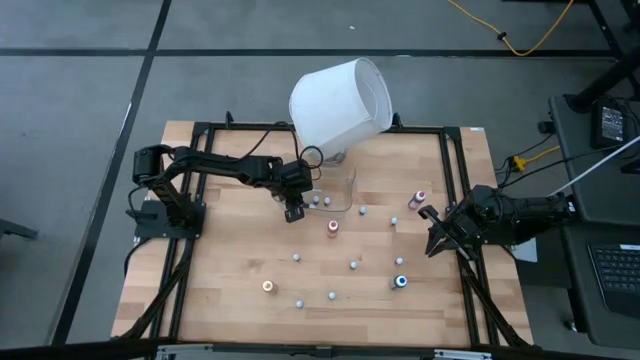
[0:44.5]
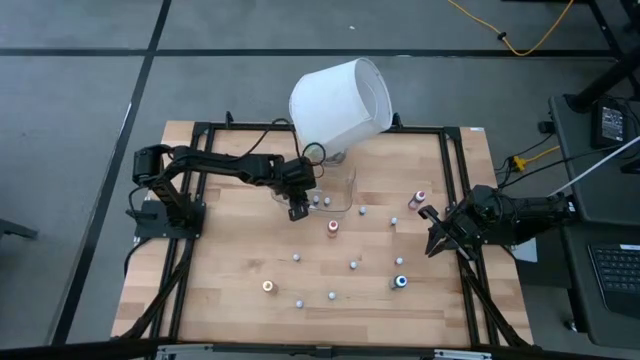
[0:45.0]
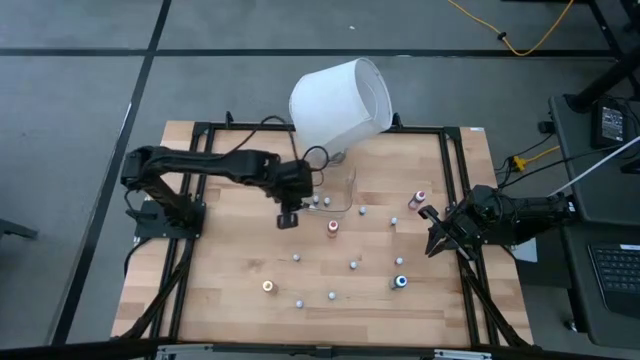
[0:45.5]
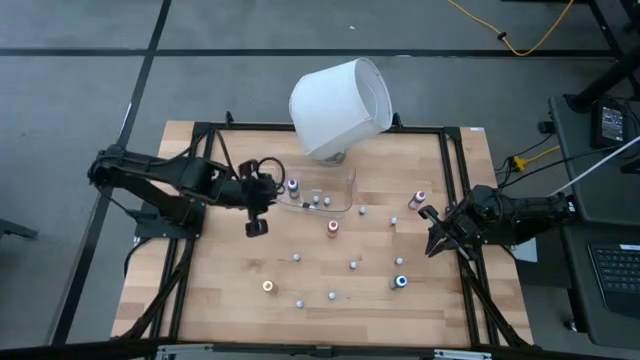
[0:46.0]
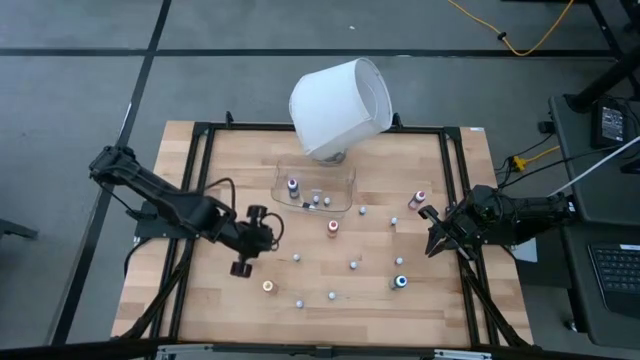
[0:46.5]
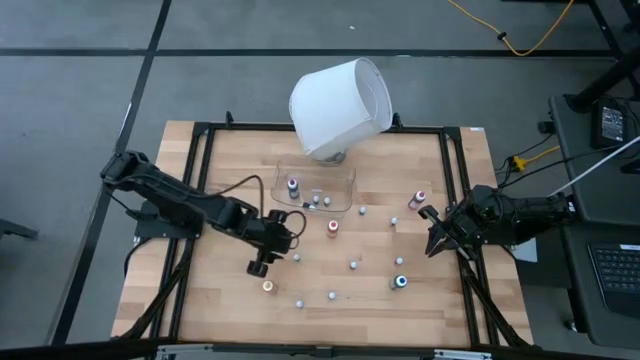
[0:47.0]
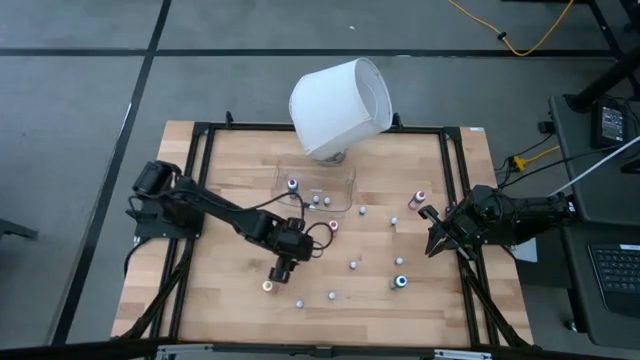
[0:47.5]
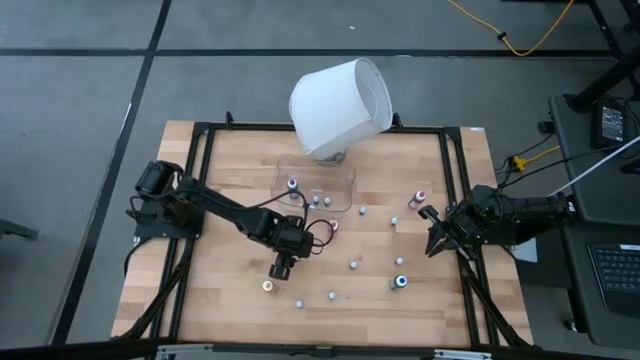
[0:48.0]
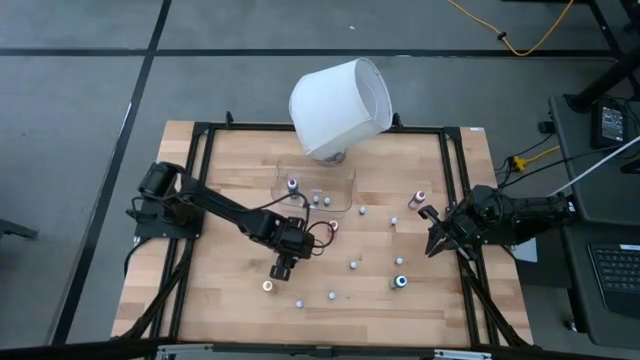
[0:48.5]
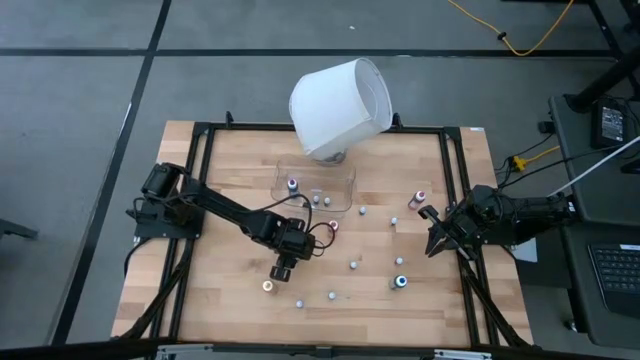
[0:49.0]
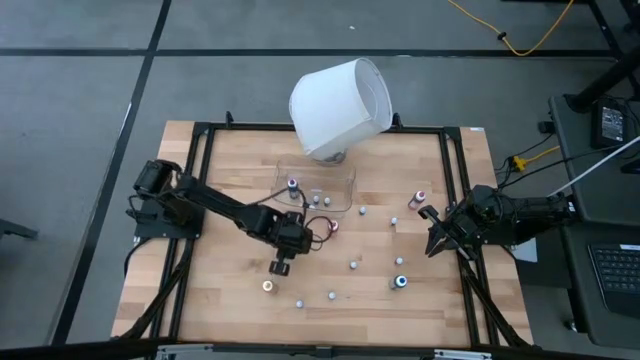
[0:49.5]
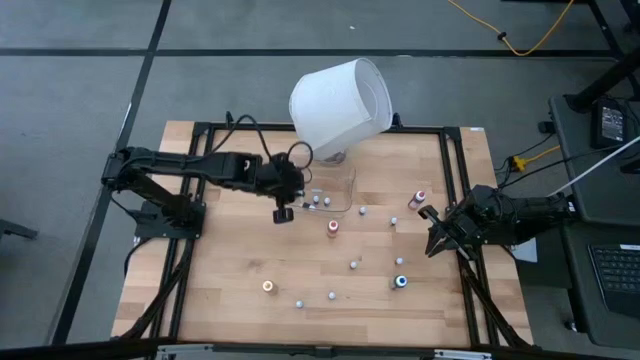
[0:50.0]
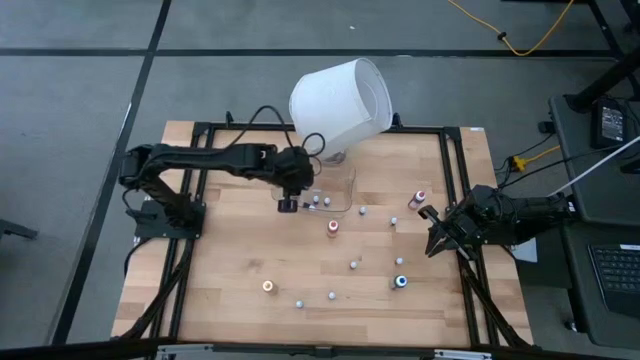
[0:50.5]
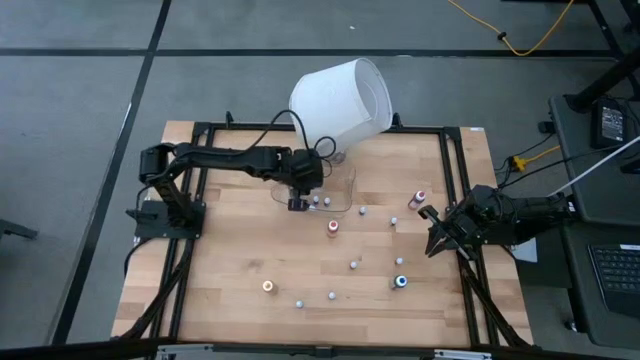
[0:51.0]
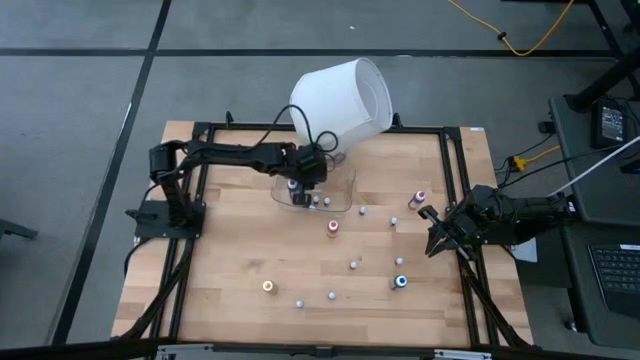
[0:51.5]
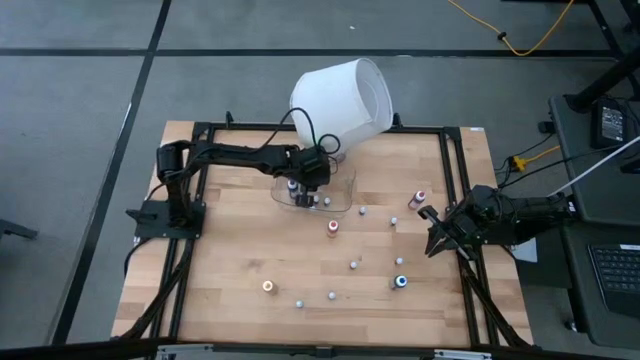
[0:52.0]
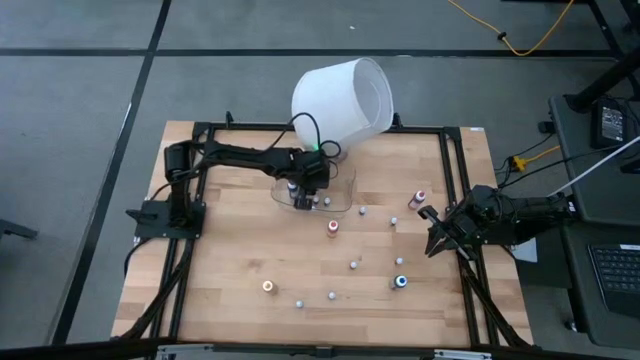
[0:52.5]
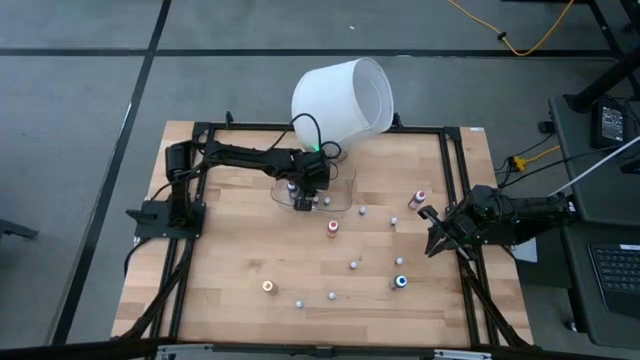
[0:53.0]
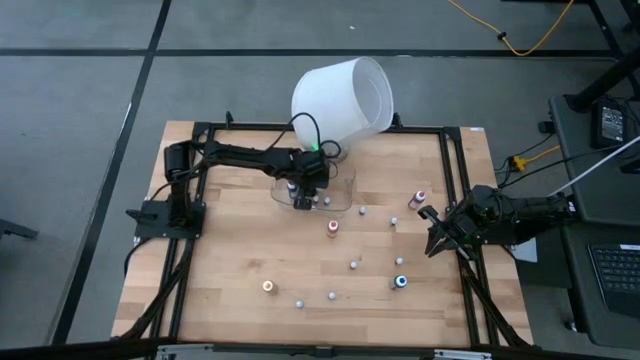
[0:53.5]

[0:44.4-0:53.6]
Task: Pick & Place food coloring
Put the bottom small blue food coloring bottle into the container

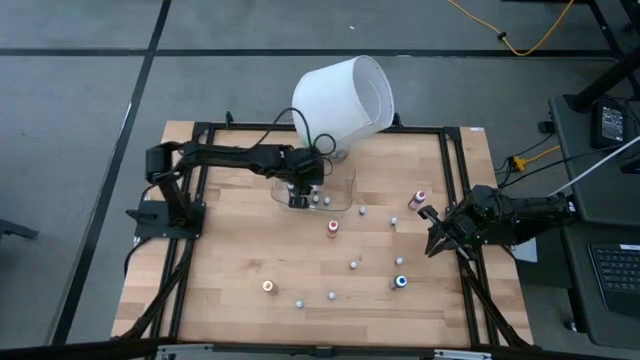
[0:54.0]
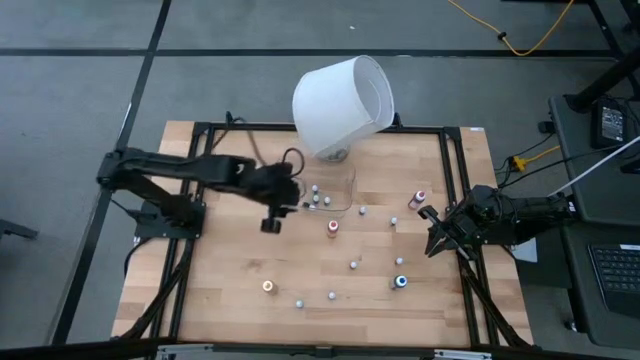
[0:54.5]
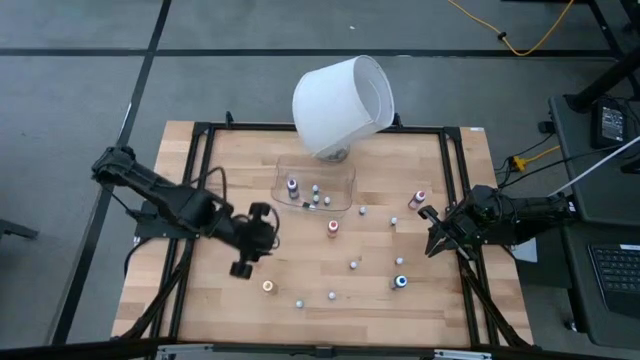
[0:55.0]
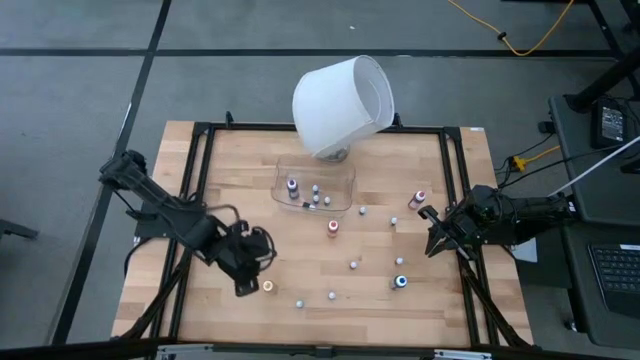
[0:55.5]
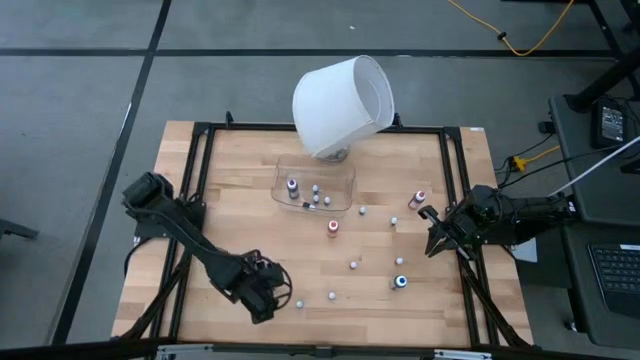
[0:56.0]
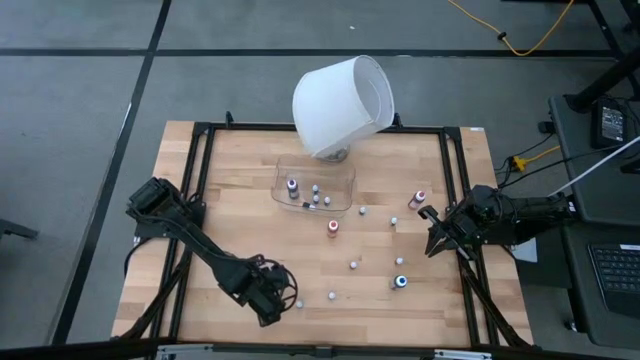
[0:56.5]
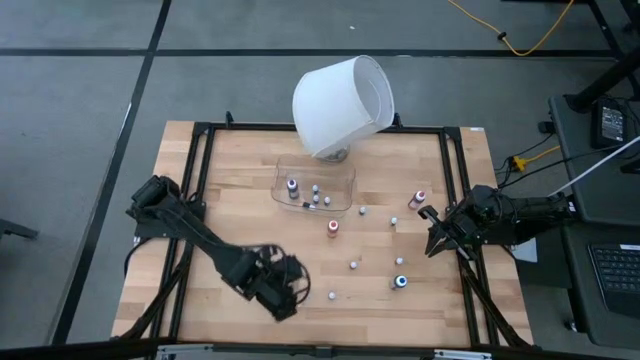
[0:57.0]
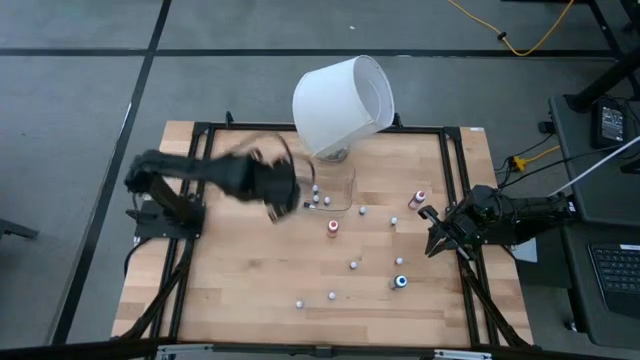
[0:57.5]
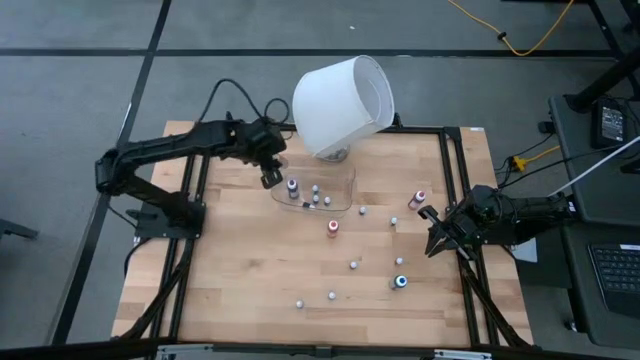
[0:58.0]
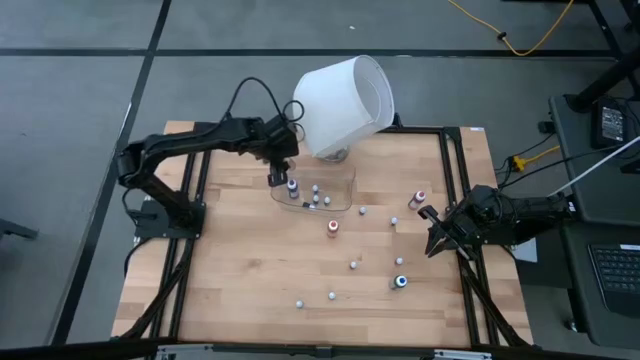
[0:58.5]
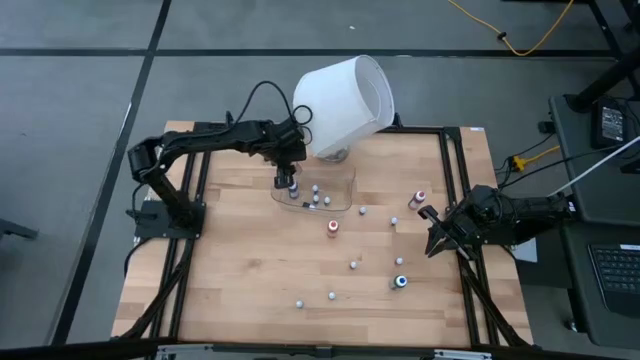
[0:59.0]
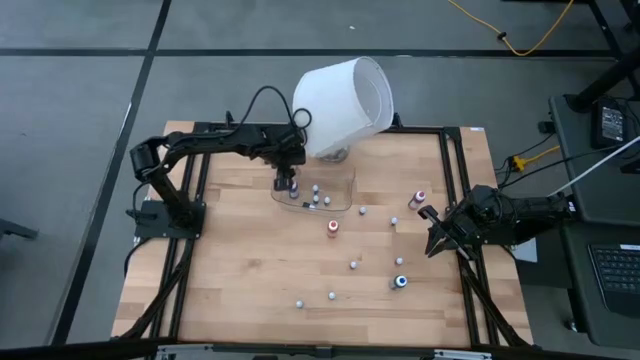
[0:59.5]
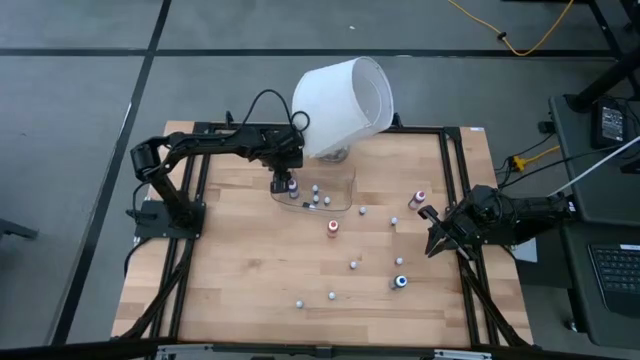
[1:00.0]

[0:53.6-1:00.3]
Put the big yellow food coloring bottle into the container

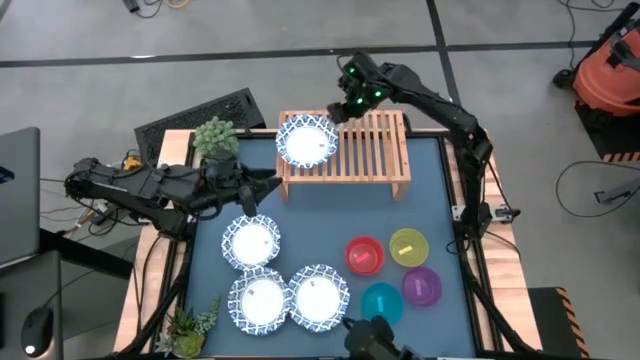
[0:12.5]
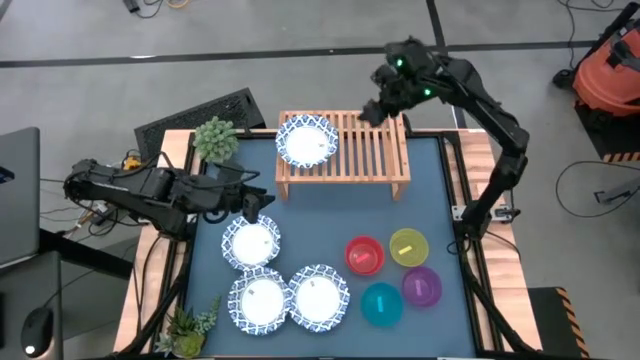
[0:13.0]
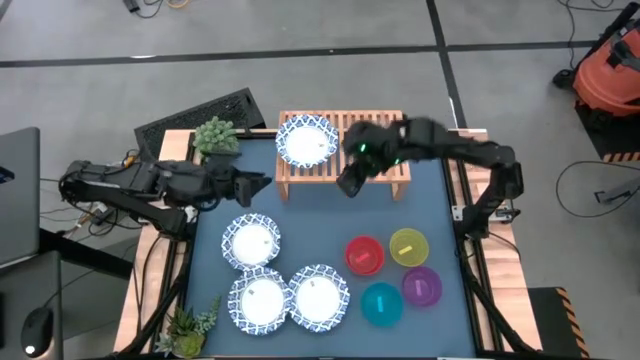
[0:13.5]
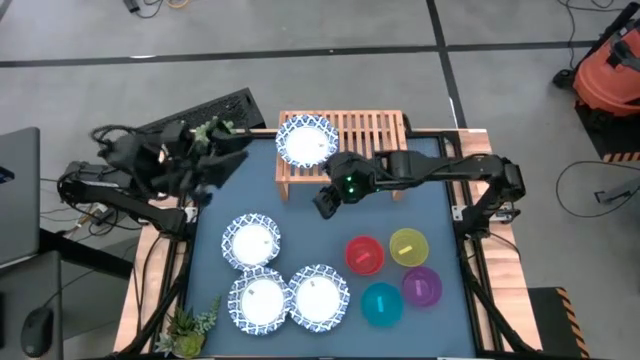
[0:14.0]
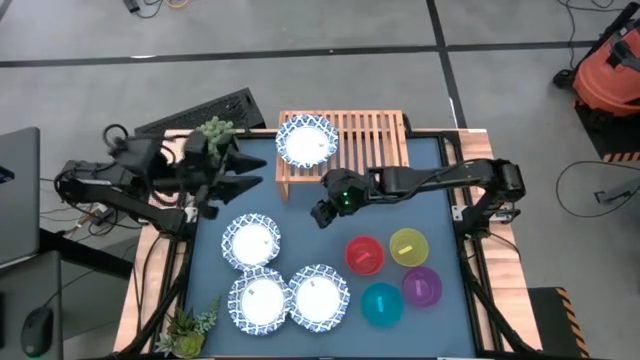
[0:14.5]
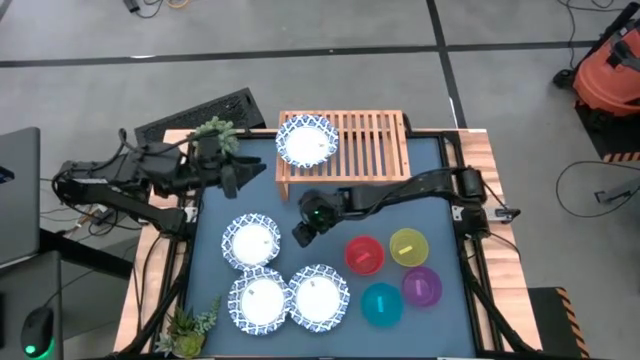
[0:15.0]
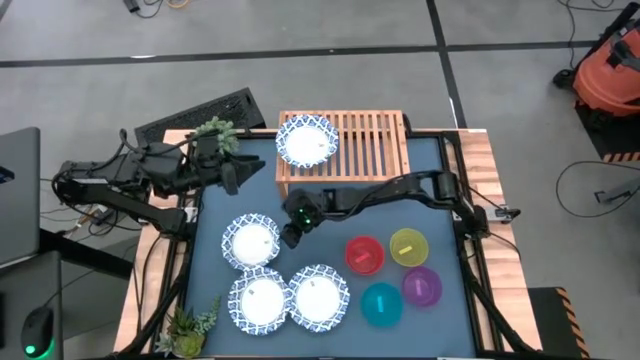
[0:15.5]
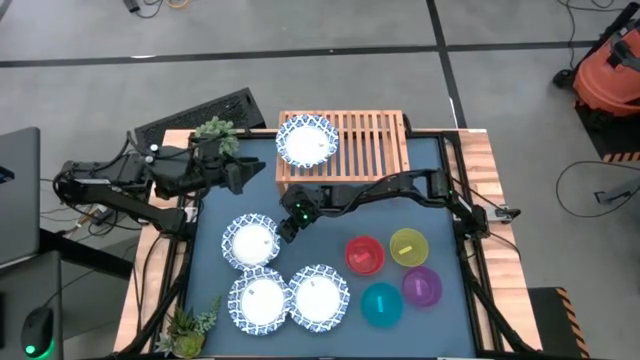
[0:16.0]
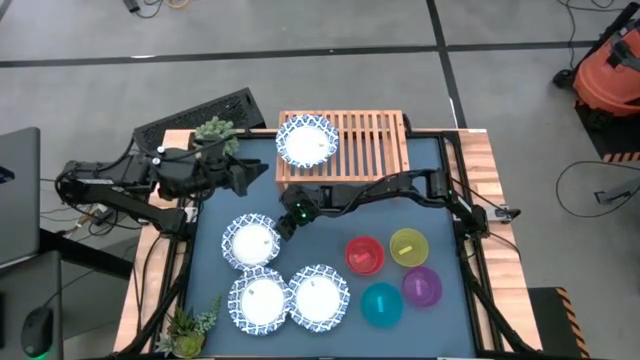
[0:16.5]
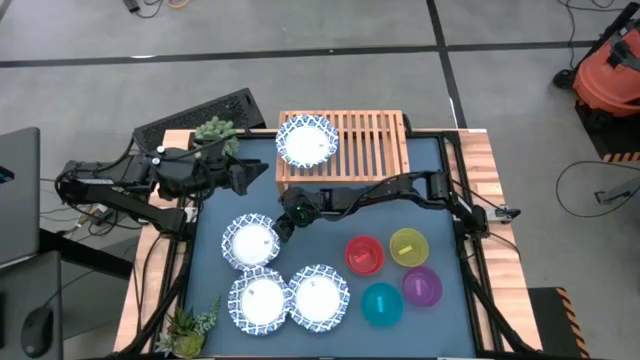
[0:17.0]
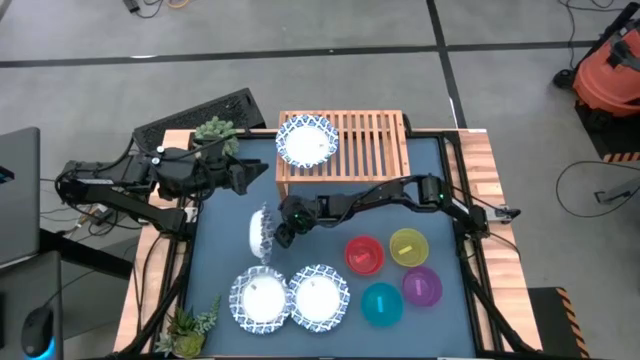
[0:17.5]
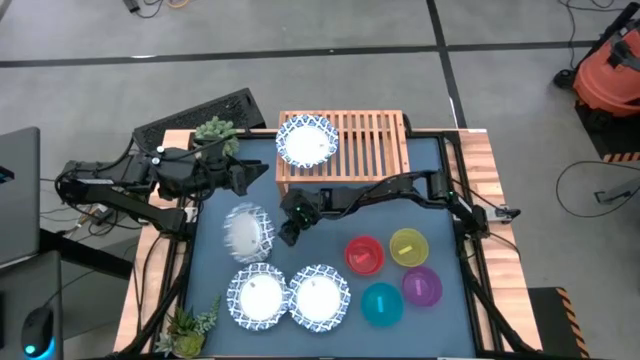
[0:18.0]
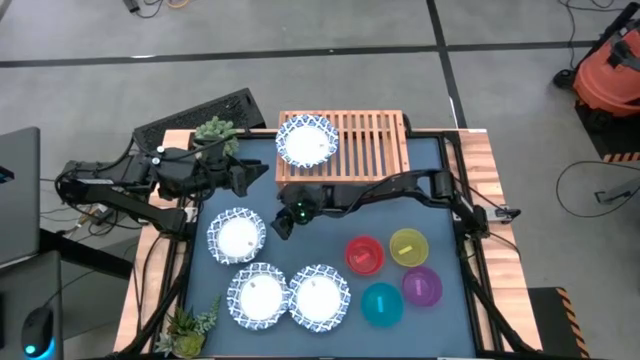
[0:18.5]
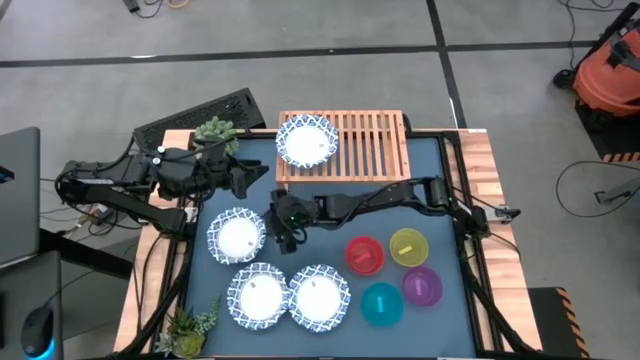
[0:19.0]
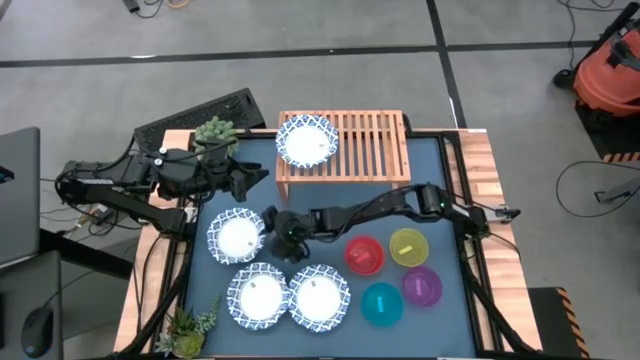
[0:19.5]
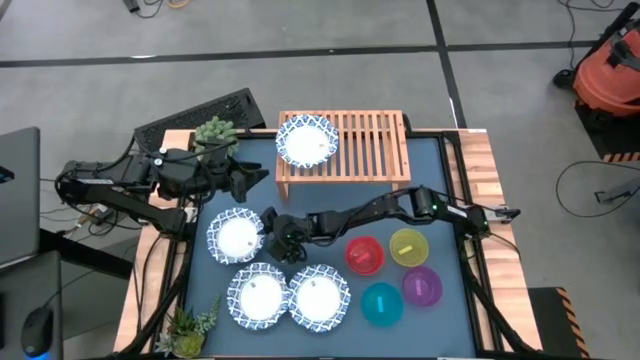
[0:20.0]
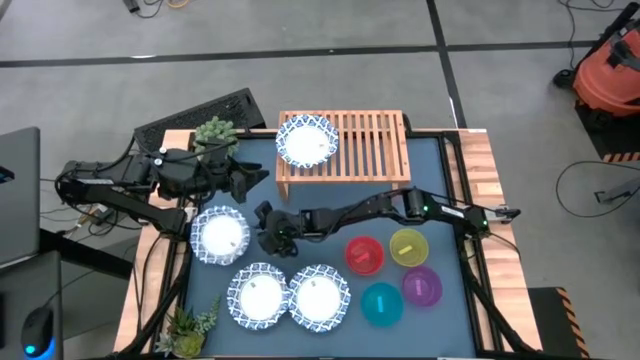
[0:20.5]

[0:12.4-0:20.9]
Task: Place and stack bowls onto a shelf
Stack the top white patterned bowl on top of the white patterned bowl on the shelf
